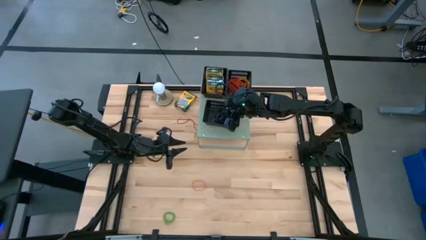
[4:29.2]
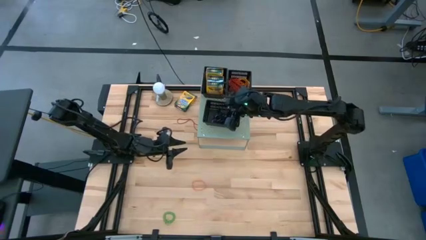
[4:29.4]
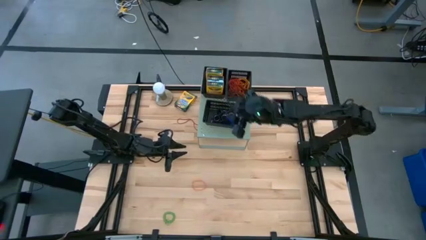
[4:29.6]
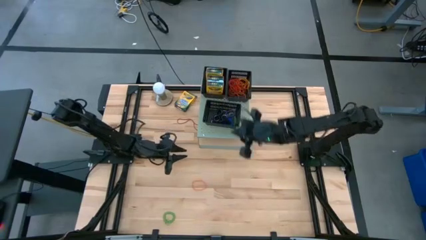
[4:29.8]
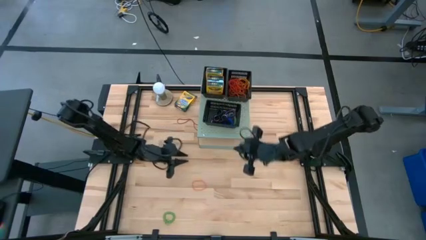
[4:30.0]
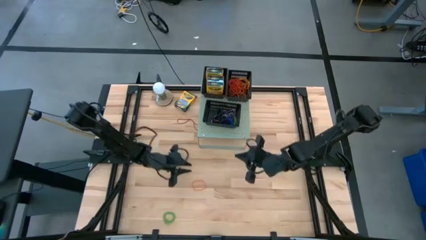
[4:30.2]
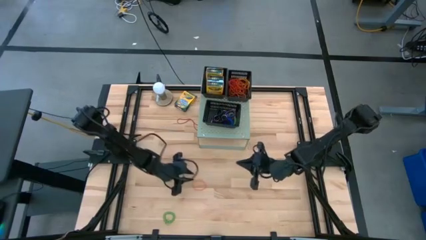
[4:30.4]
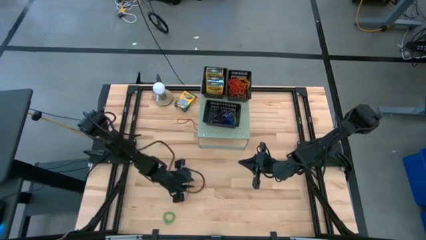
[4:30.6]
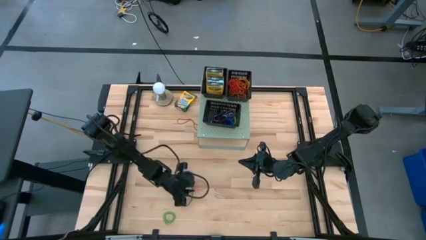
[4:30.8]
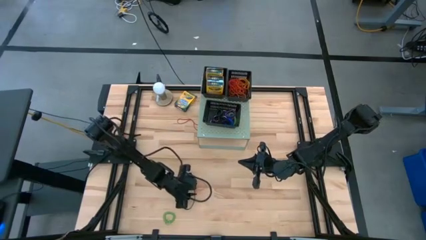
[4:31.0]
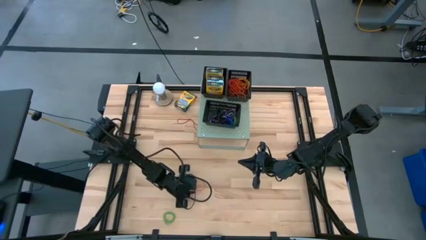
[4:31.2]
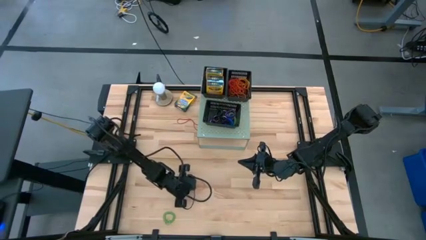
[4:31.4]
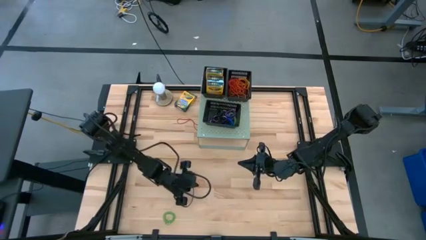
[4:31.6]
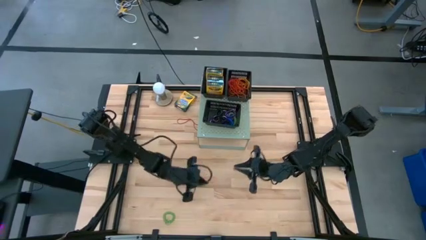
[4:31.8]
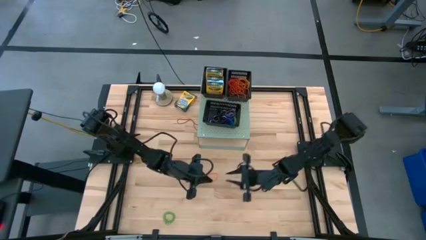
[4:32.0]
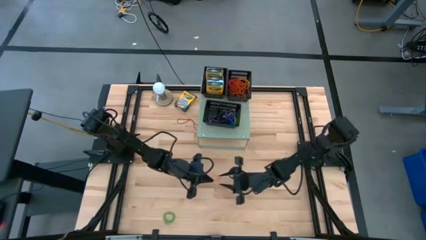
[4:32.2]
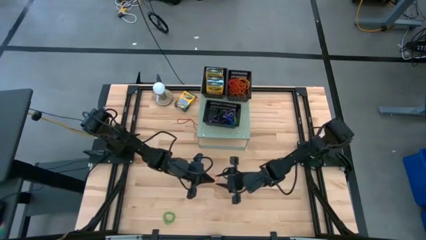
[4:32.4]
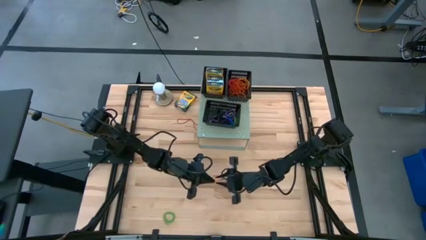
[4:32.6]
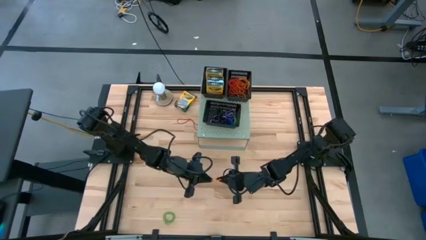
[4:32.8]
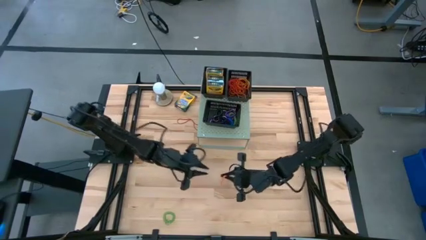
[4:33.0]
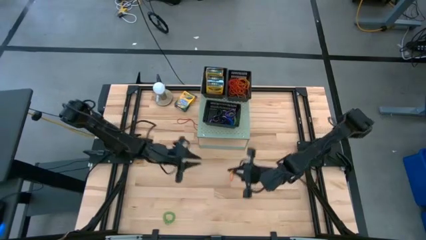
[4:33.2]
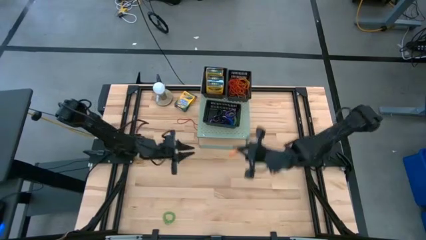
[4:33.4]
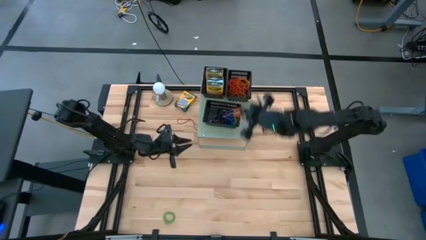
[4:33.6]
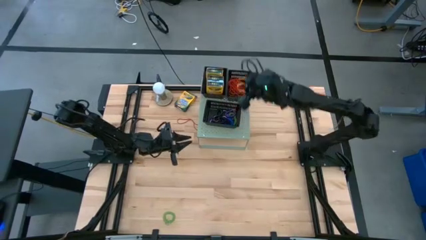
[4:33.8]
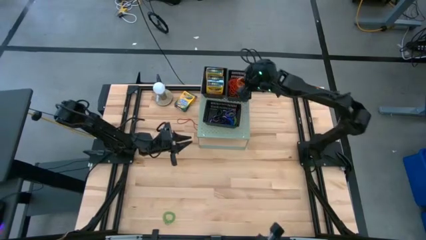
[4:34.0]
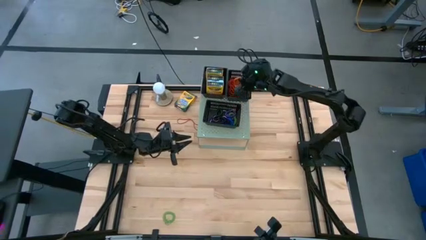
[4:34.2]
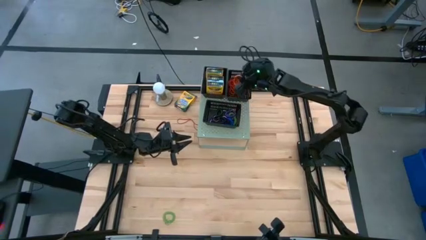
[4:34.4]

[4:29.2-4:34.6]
Task: Pick & Place Office Desk Supplies
Put the orange rubber band into the top right black bin on the shelf

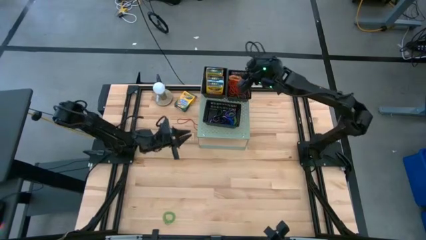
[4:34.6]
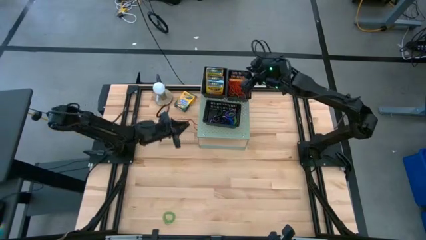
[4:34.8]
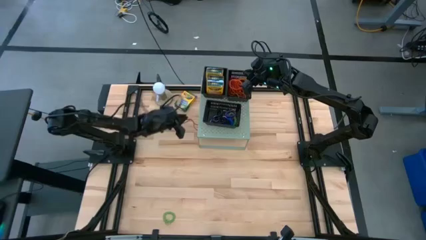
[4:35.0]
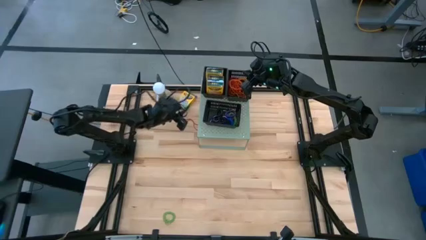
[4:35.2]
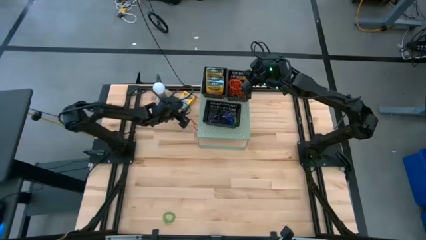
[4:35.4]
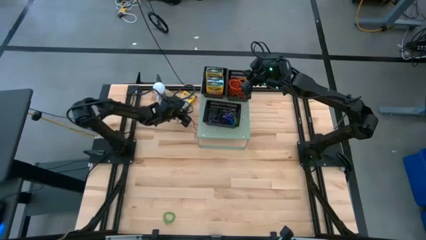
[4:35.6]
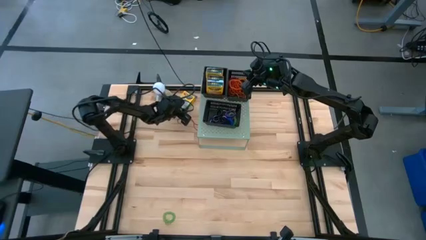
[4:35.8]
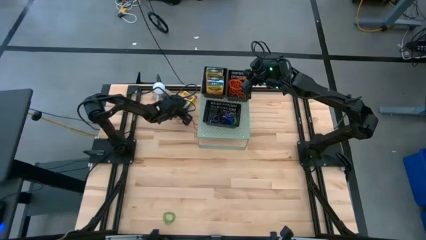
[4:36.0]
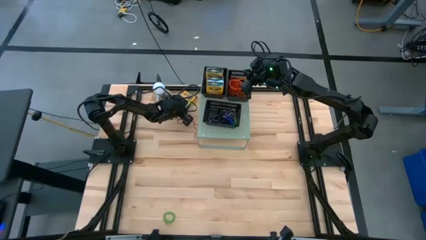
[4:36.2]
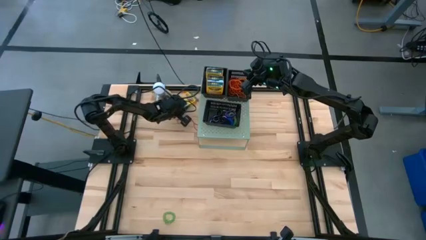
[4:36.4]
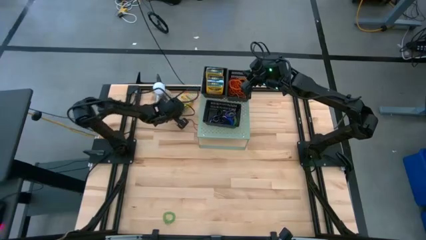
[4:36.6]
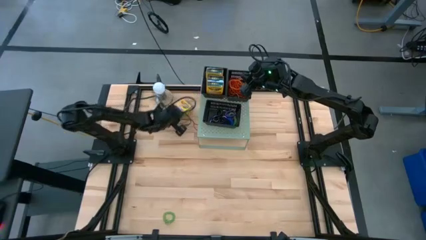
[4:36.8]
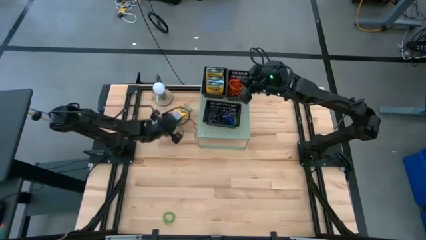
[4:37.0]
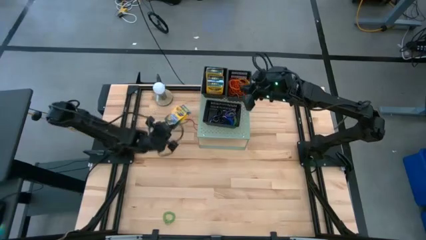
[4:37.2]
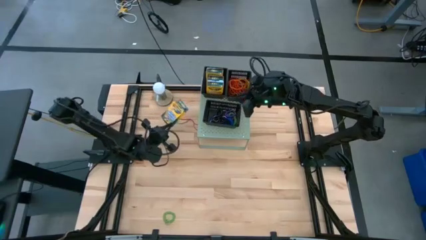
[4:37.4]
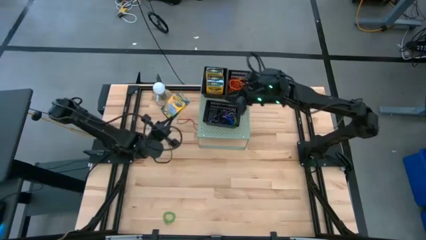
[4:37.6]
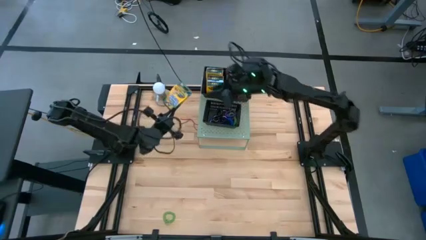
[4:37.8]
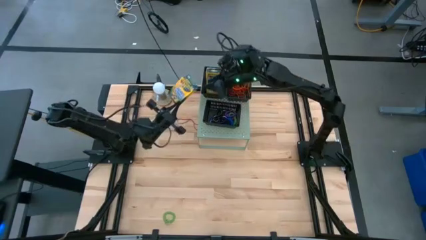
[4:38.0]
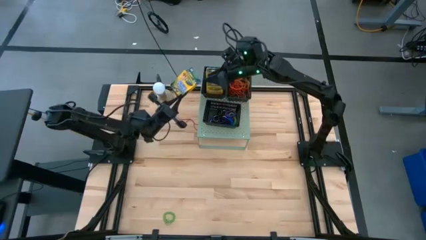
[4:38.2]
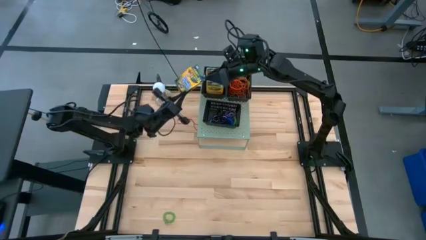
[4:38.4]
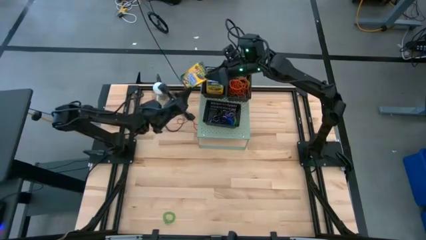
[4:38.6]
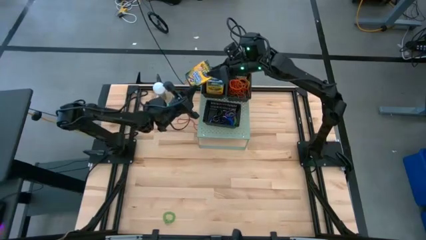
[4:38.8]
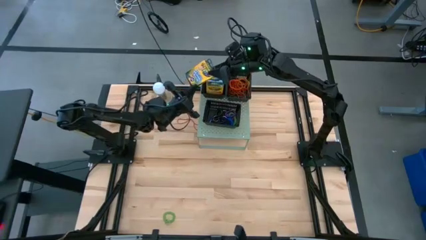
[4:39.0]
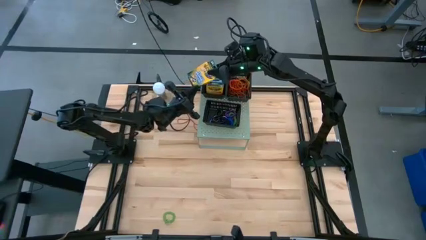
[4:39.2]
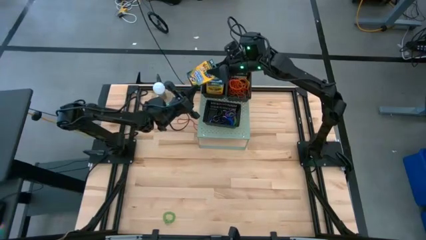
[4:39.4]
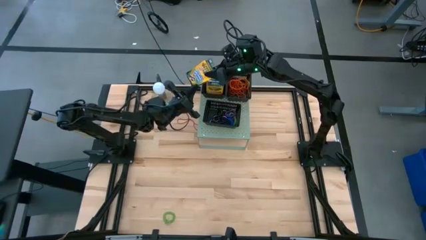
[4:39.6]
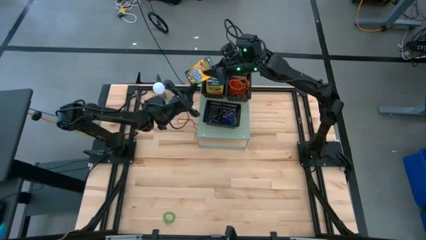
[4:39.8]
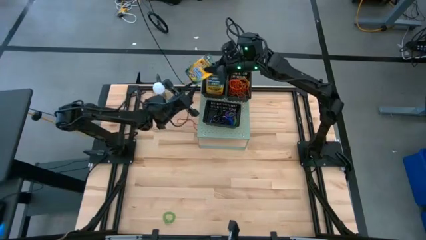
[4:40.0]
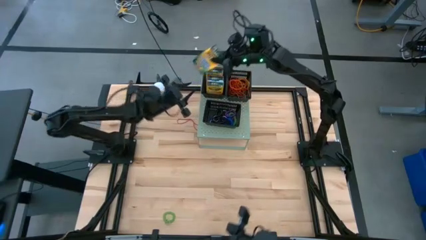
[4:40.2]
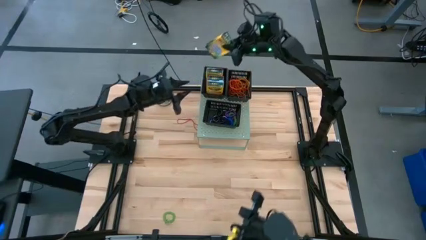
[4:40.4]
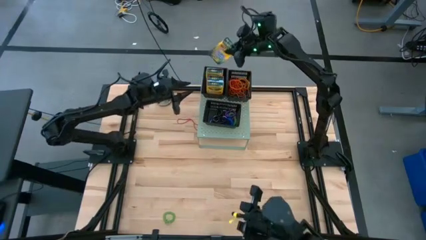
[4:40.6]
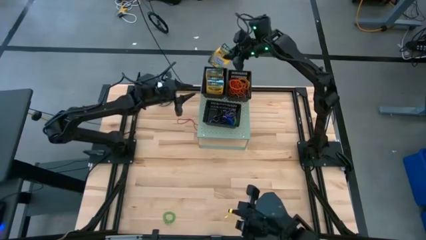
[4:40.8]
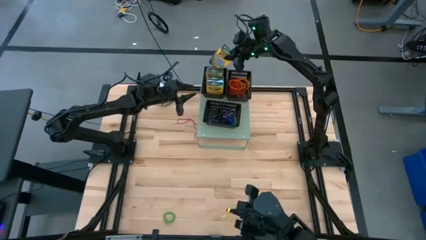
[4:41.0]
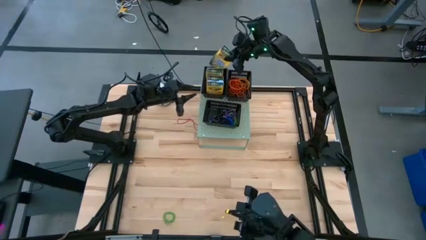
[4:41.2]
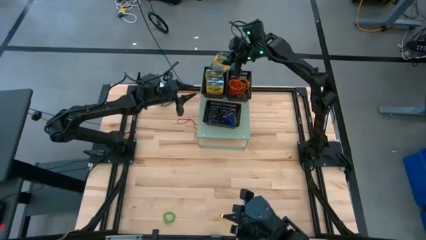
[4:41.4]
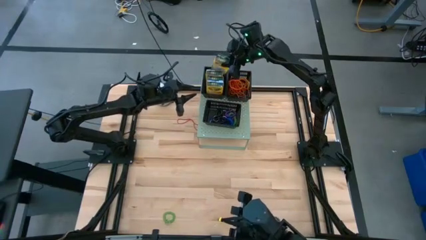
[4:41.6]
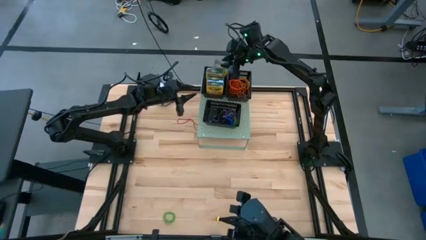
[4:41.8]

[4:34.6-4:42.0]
Put the yellow crayon box into the top left black bin on the shelf

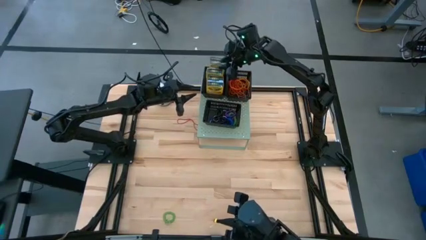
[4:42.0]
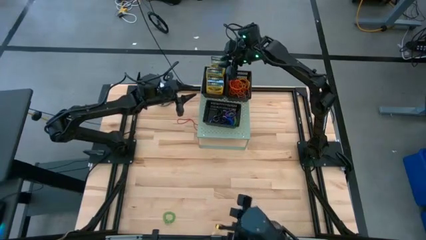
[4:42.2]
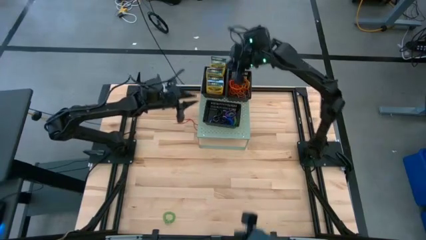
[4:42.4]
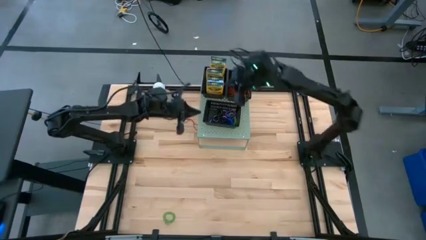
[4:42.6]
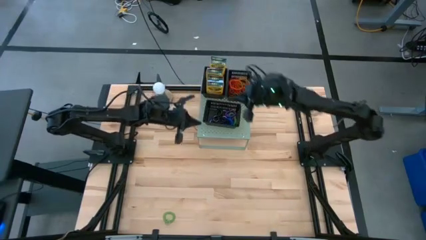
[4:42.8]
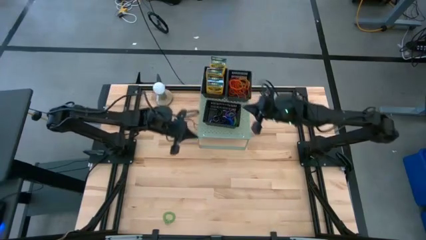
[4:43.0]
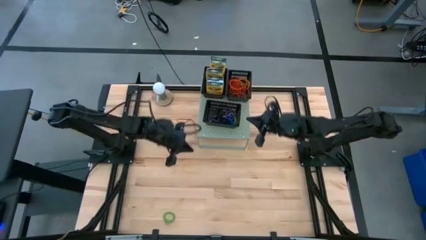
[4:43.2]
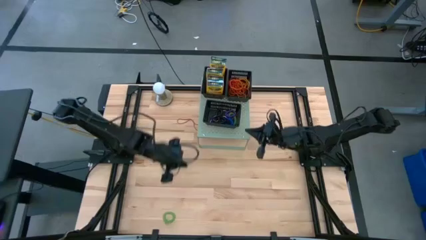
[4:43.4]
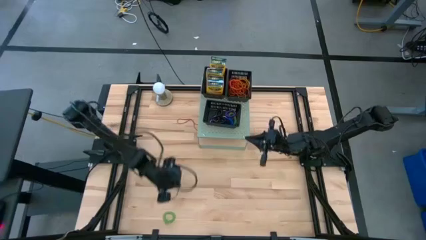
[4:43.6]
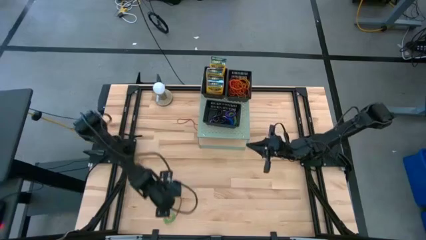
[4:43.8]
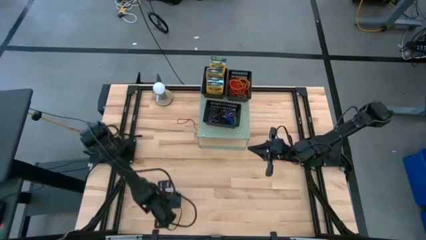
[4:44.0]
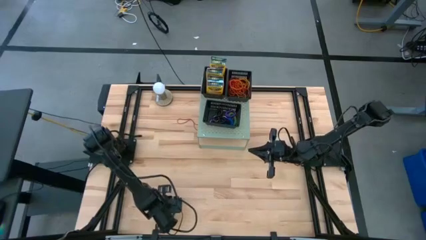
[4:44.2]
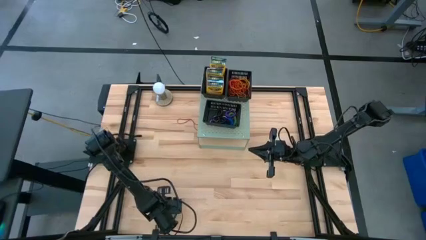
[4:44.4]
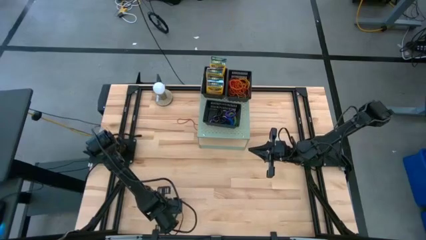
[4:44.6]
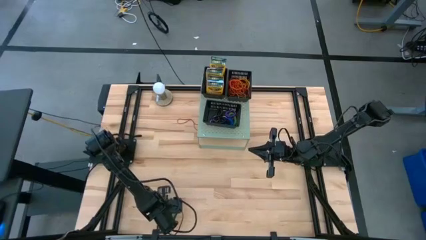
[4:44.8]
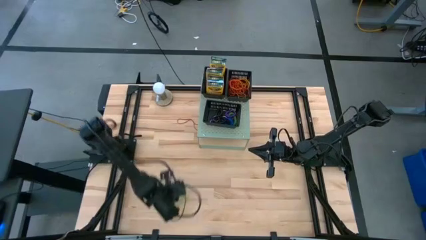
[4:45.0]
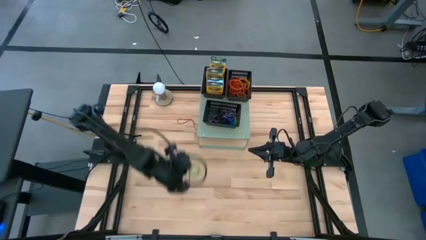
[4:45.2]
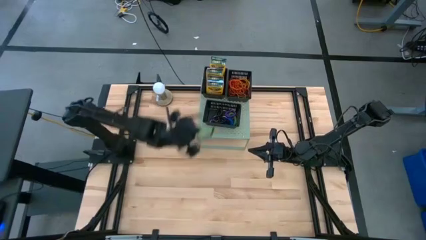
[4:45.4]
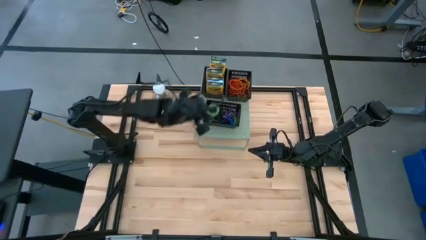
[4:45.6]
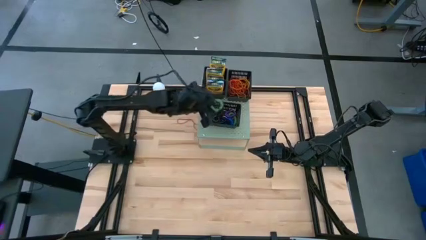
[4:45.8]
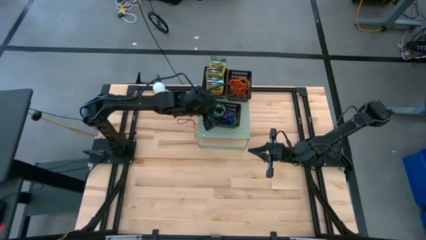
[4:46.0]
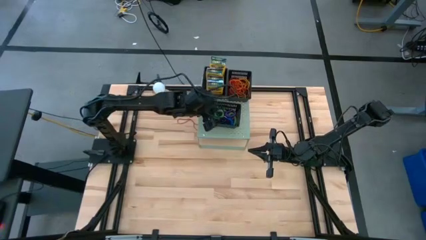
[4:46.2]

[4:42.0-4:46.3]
Put the green spring keychain into the bottom black bin on the shelf
